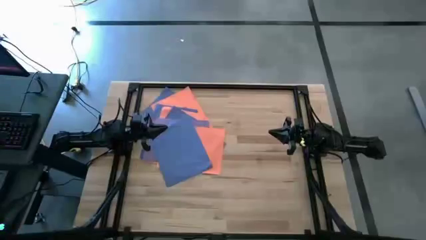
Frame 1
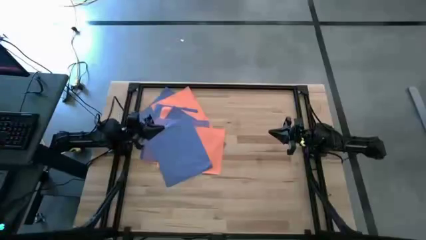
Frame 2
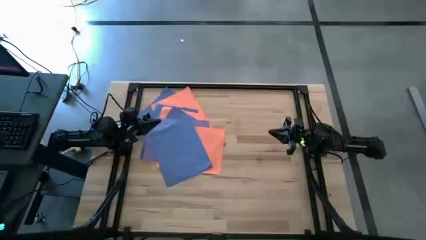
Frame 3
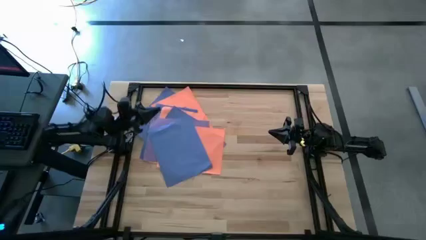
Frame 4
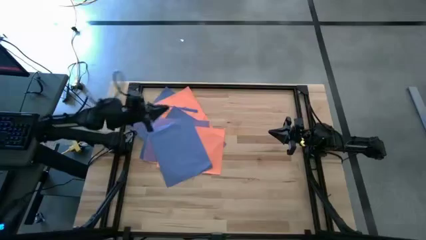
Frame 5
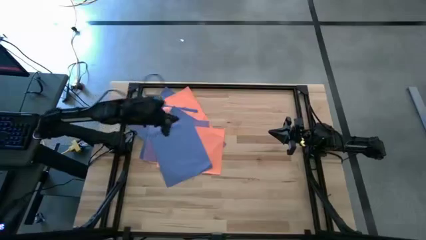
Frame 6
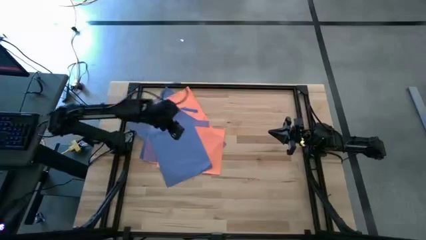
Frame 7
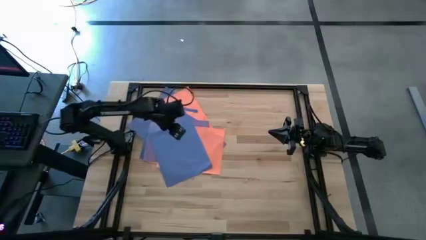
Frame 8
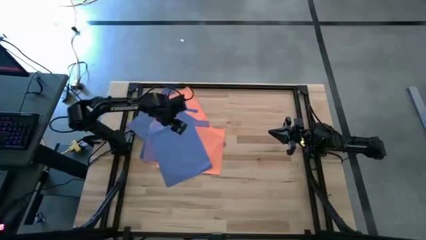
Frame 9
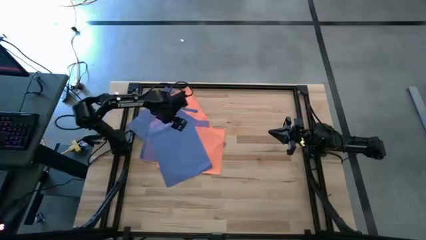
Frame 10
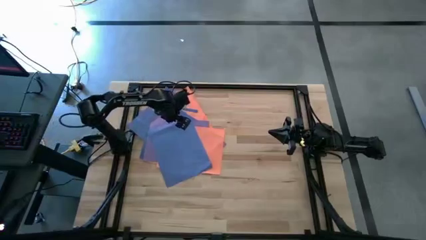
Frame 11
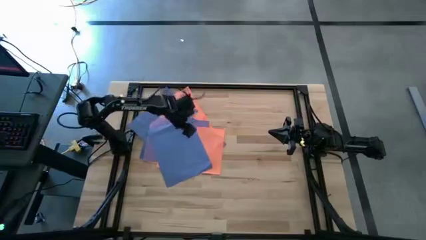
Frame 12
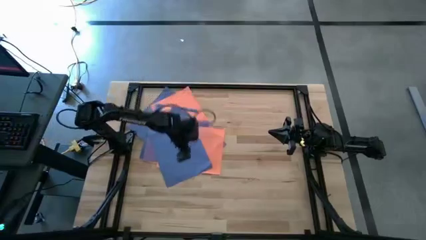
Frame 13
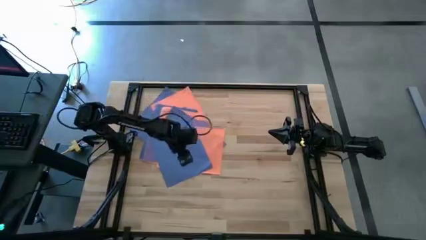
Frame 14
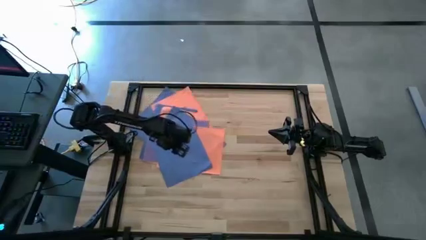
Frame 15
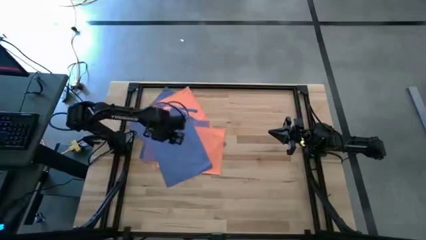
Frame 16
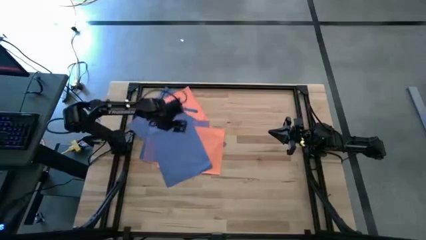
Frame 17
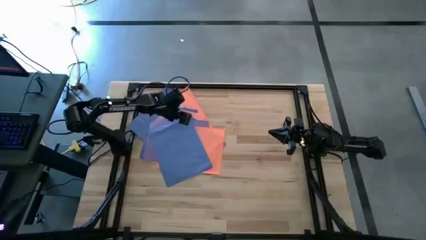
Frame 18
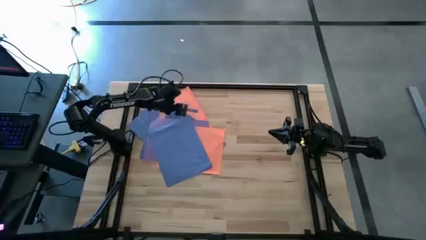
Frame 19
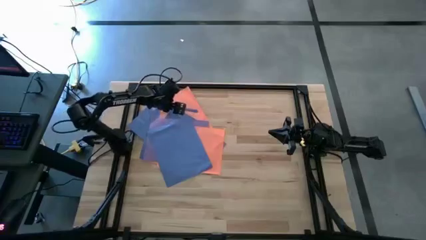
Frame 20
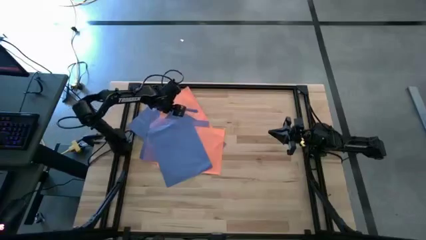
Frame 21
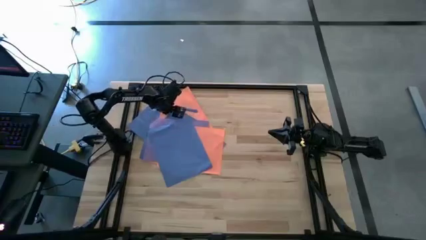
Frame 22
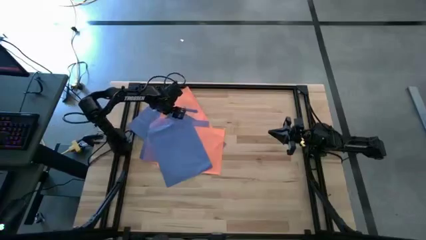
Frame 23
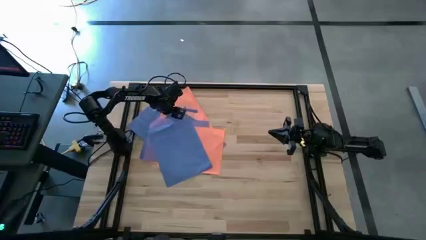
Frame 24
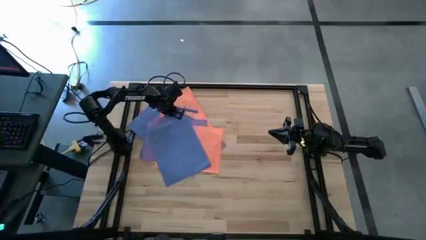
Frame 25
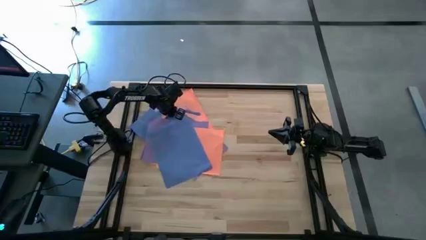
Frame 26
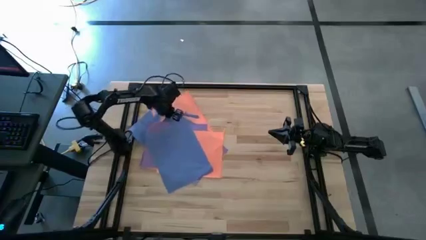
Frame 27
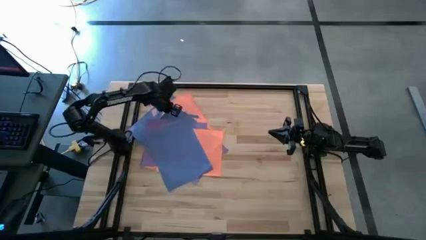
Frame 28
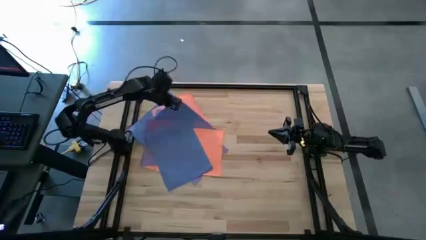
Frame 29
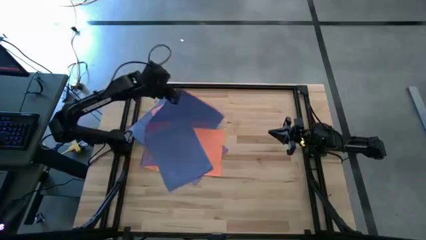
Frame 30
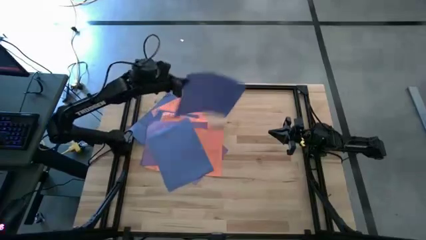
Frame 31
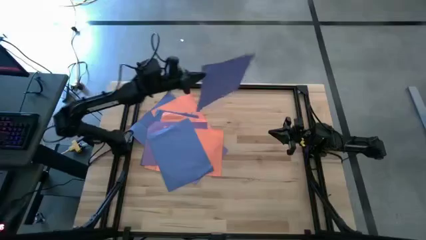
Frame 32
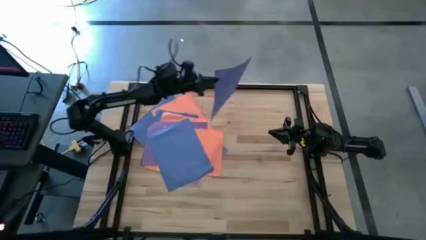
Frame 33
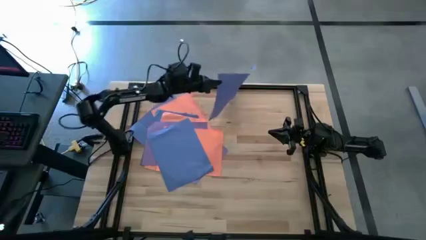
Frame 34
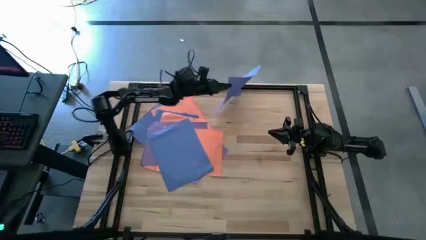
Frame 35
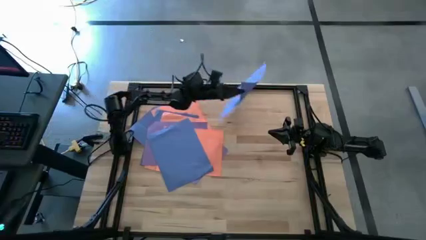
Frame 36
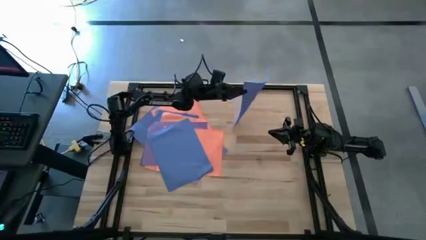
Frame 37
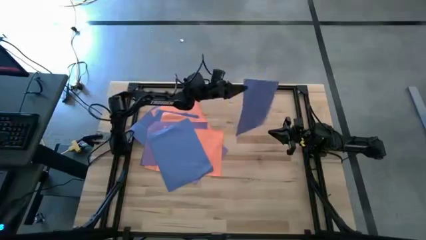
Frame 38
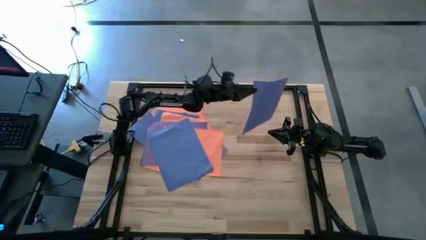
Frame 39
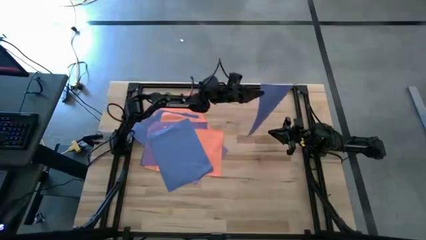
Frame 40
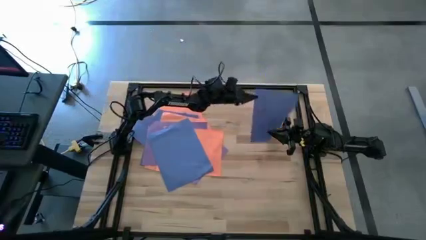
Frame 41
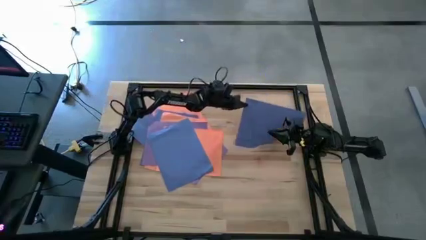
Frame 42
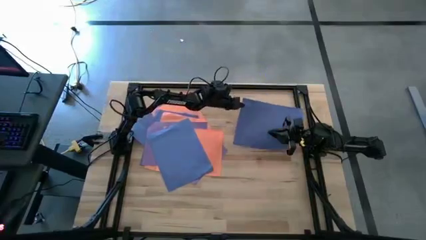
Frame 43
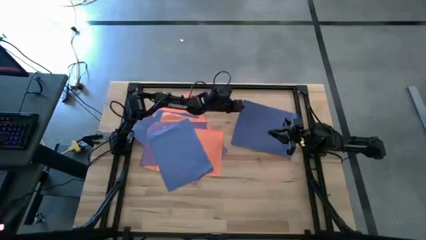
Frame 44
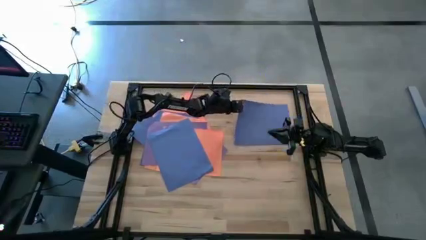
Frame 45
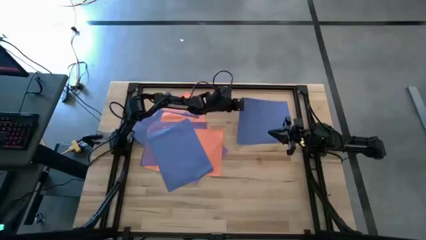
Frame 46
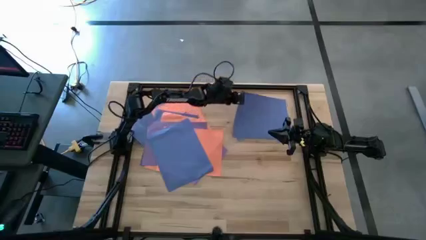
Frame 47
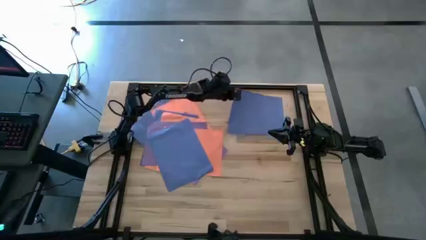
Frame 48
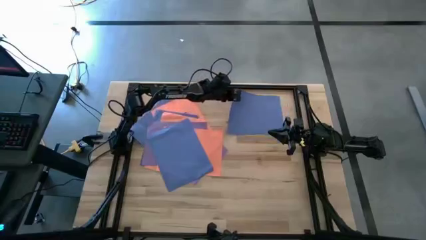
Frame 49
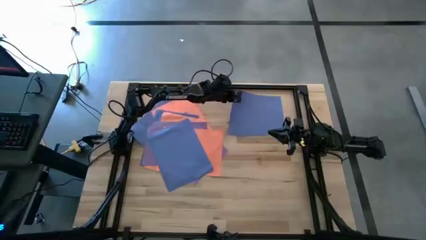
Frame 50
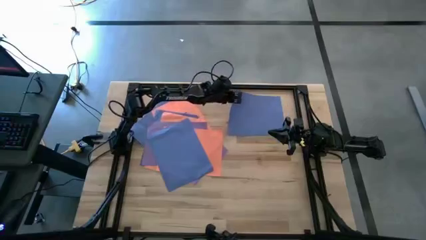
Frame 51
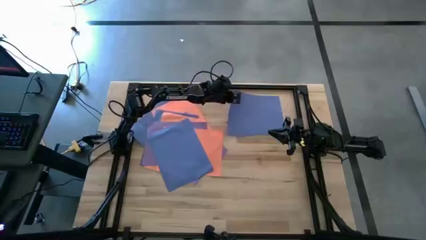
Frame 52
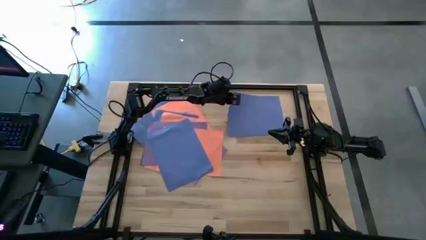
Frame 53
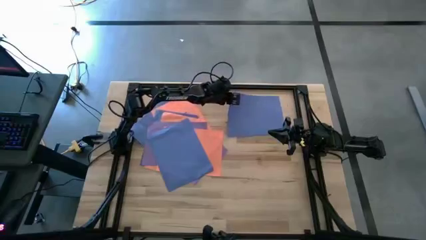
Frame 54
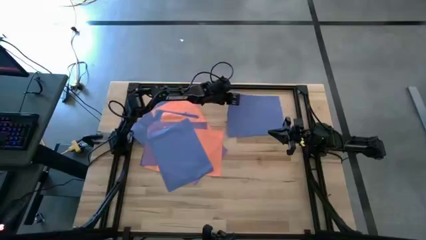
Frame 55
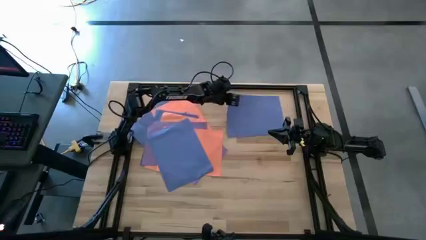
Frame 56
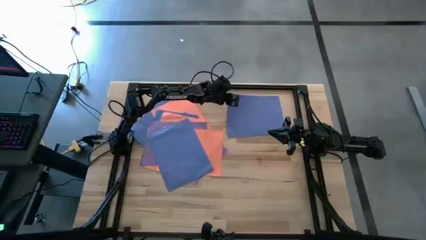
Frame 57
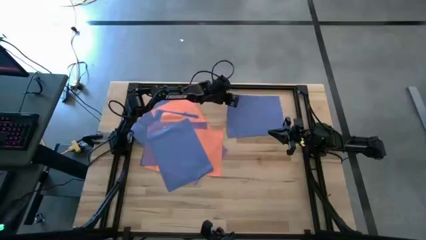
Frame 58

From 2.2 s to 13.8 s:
Task: Organize paper
Put the blue colored paper to the top right of the table
